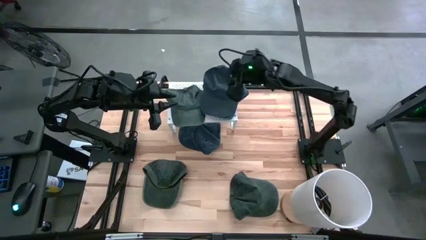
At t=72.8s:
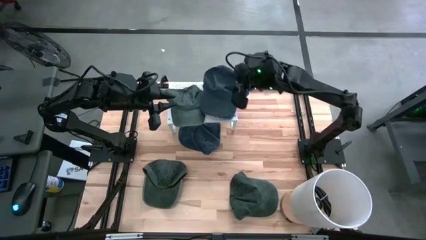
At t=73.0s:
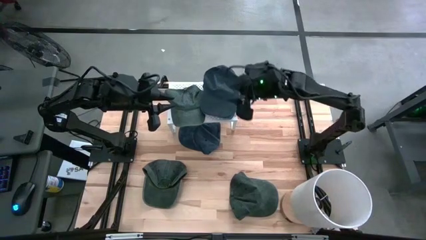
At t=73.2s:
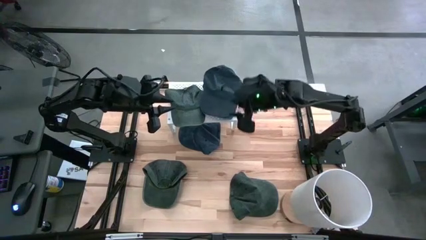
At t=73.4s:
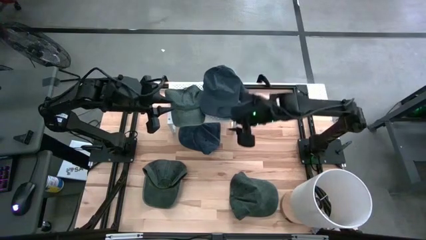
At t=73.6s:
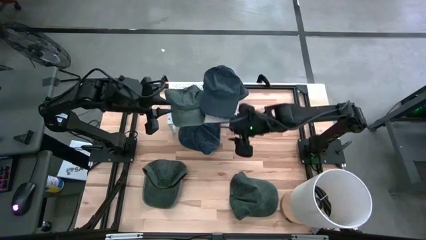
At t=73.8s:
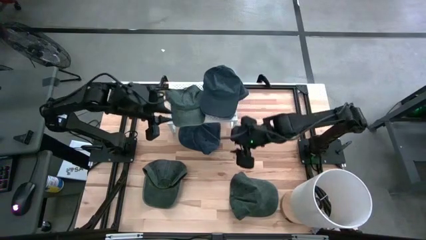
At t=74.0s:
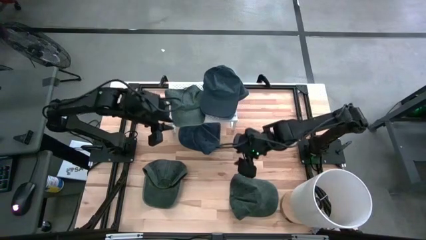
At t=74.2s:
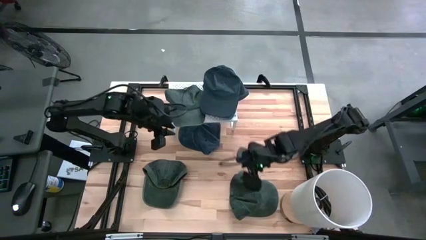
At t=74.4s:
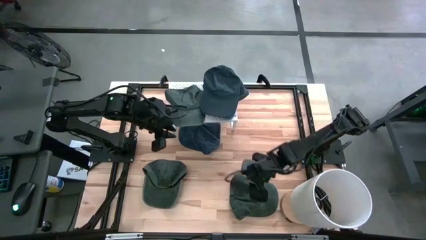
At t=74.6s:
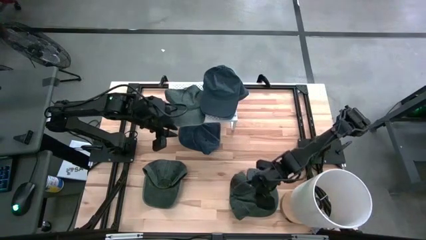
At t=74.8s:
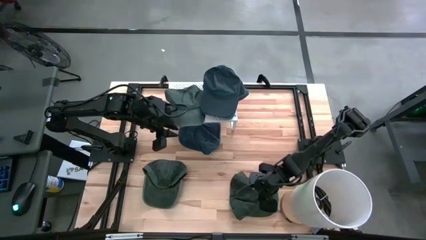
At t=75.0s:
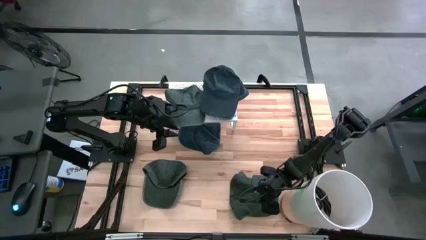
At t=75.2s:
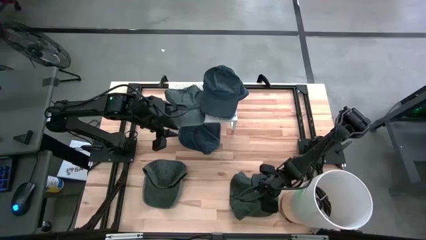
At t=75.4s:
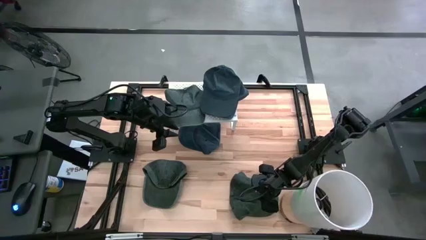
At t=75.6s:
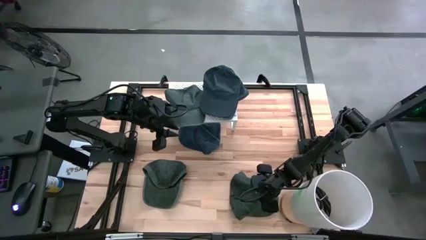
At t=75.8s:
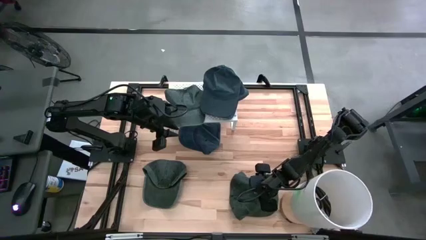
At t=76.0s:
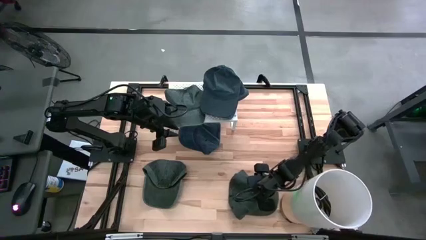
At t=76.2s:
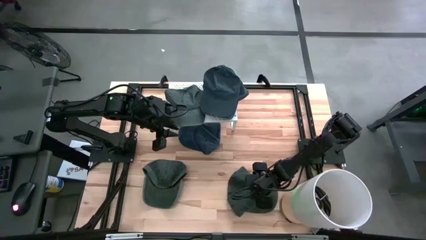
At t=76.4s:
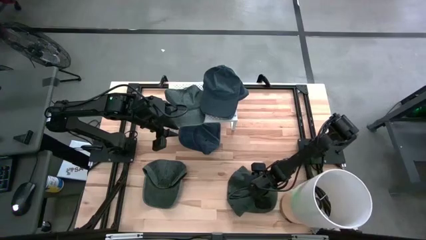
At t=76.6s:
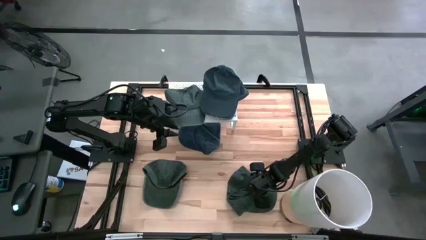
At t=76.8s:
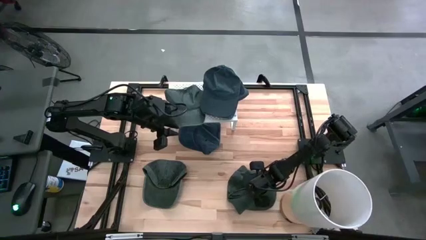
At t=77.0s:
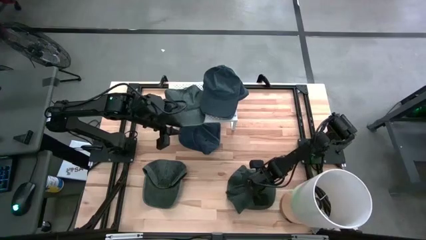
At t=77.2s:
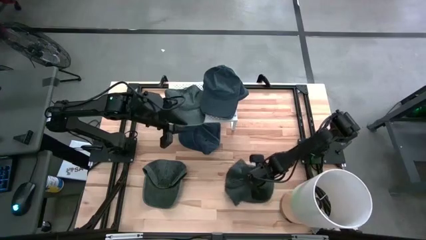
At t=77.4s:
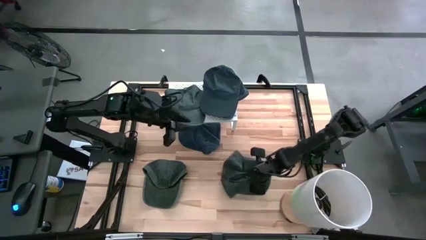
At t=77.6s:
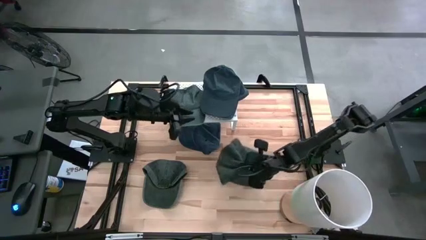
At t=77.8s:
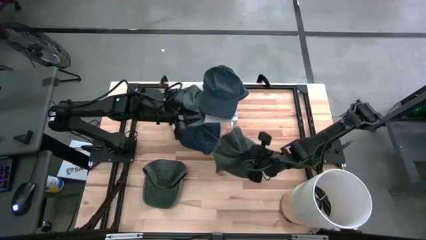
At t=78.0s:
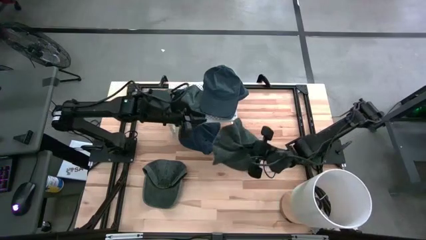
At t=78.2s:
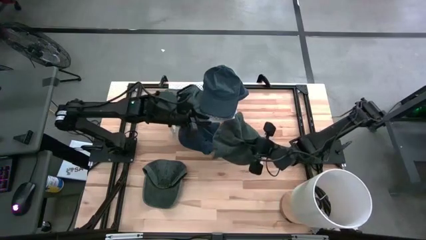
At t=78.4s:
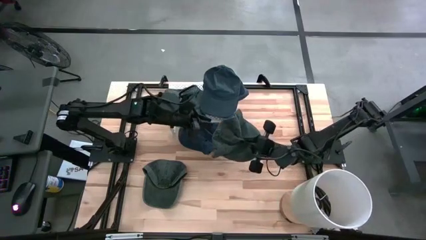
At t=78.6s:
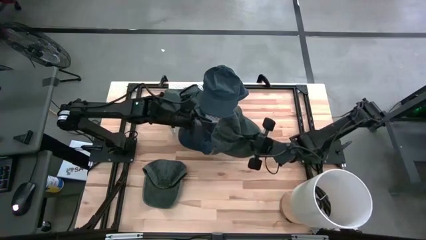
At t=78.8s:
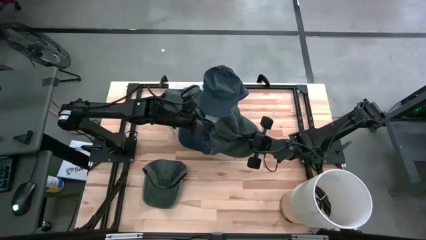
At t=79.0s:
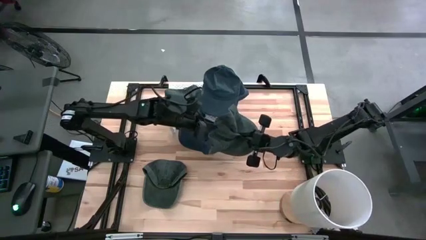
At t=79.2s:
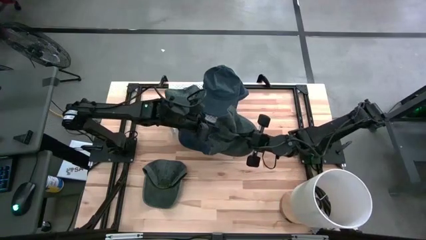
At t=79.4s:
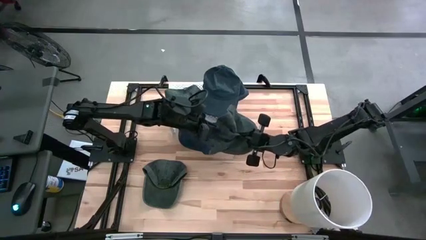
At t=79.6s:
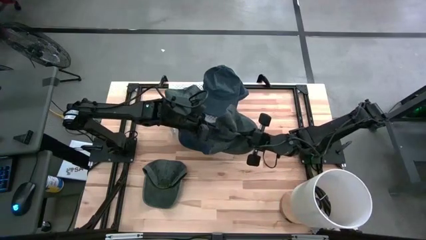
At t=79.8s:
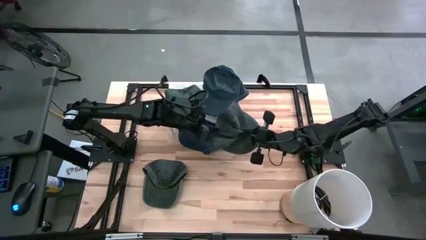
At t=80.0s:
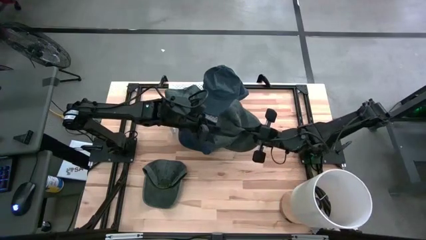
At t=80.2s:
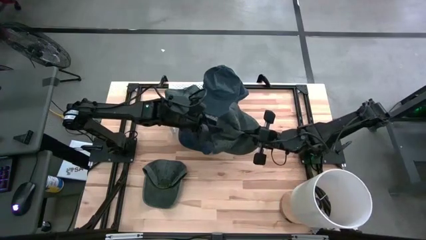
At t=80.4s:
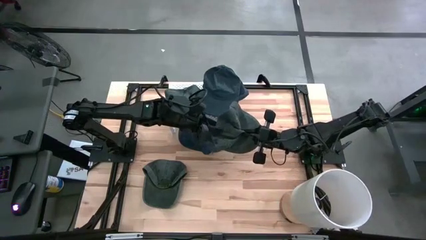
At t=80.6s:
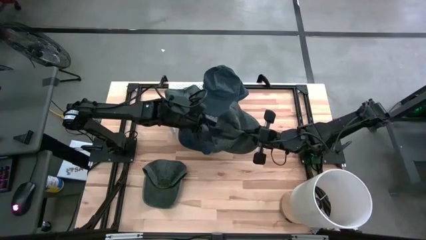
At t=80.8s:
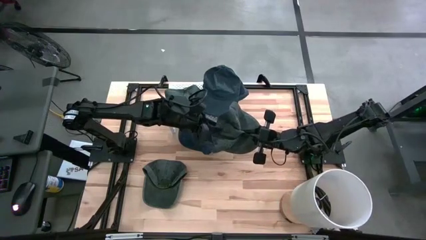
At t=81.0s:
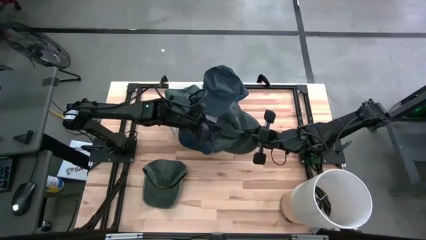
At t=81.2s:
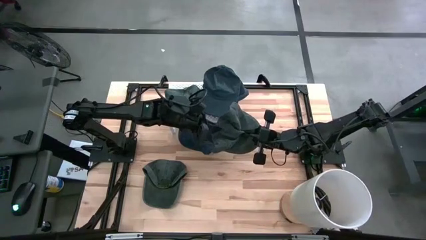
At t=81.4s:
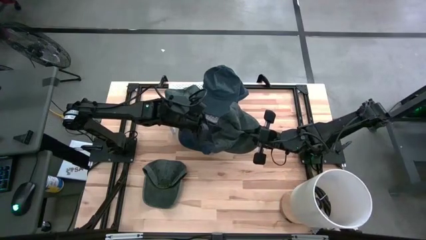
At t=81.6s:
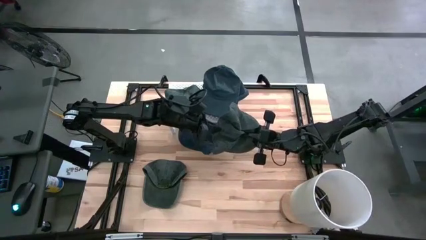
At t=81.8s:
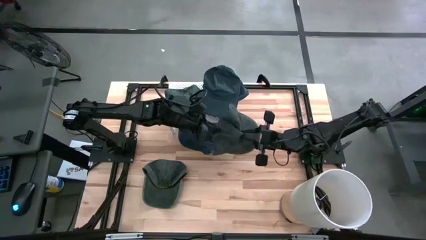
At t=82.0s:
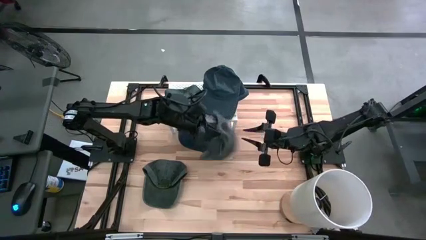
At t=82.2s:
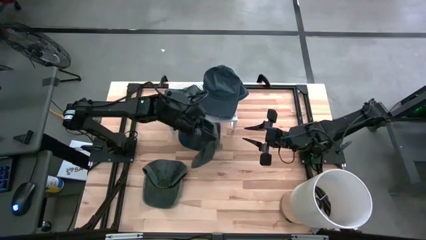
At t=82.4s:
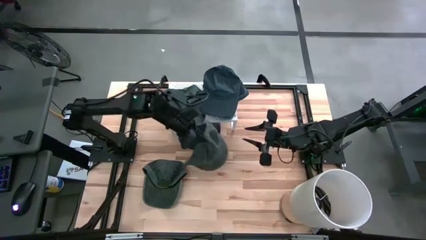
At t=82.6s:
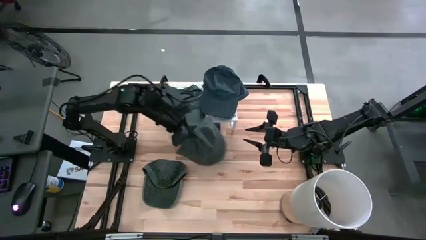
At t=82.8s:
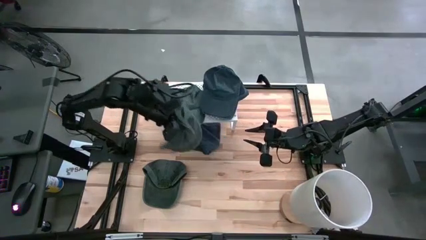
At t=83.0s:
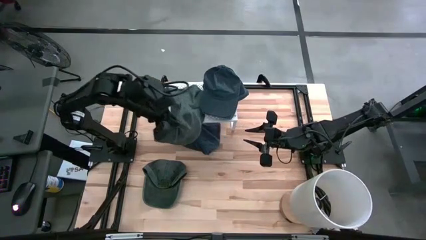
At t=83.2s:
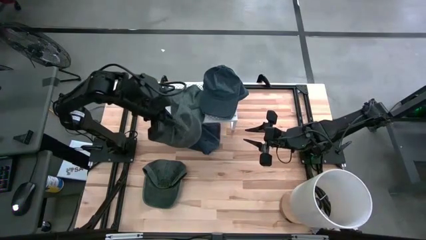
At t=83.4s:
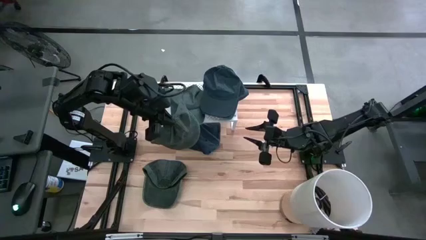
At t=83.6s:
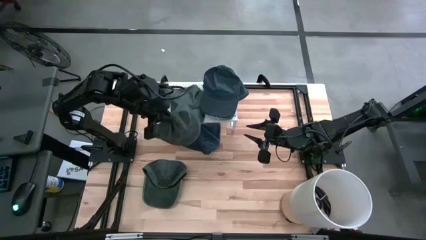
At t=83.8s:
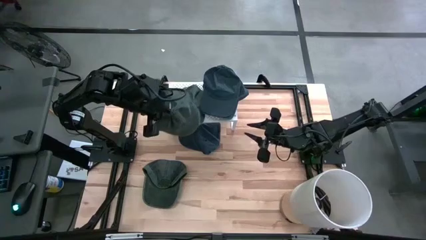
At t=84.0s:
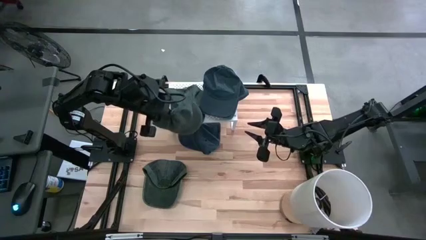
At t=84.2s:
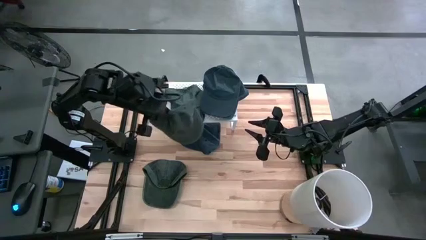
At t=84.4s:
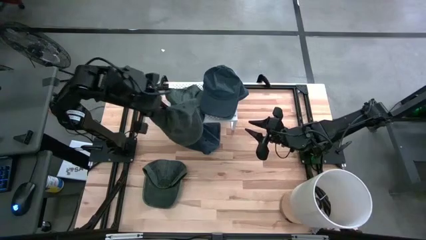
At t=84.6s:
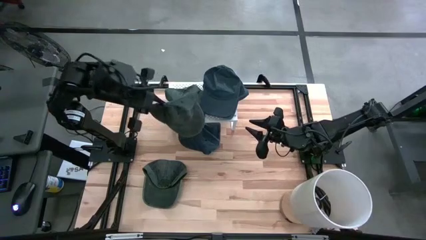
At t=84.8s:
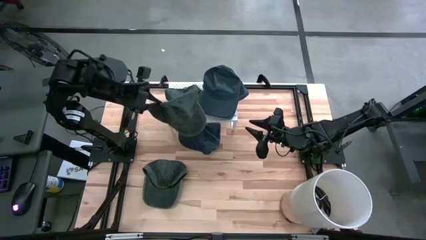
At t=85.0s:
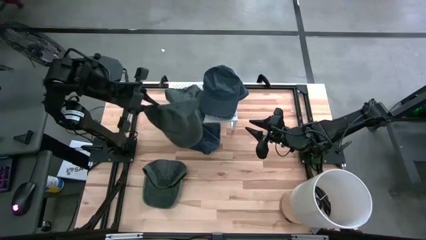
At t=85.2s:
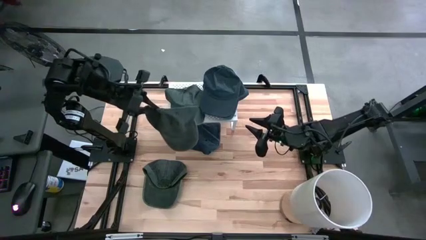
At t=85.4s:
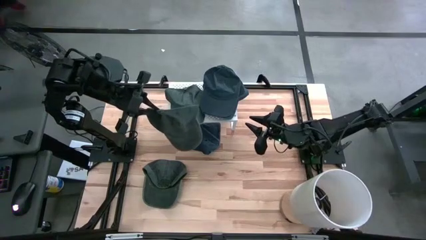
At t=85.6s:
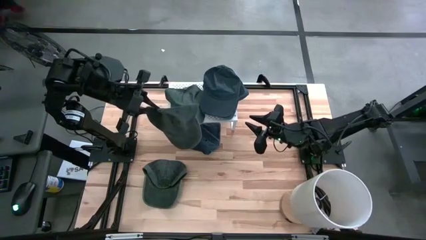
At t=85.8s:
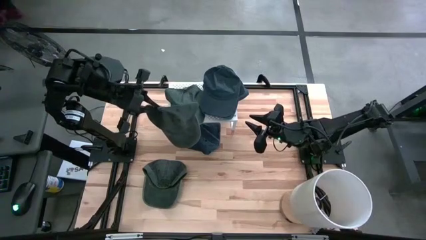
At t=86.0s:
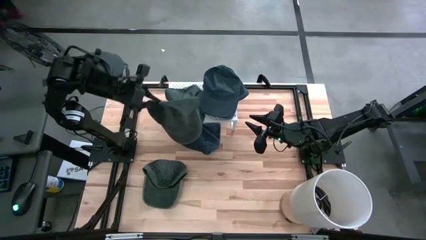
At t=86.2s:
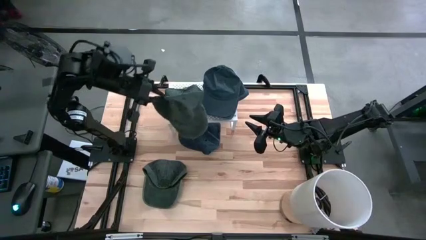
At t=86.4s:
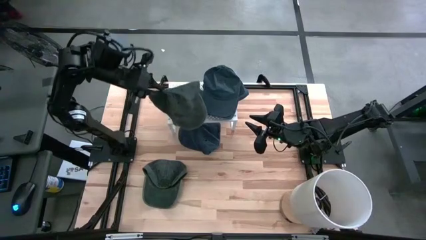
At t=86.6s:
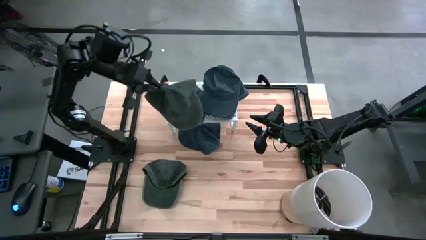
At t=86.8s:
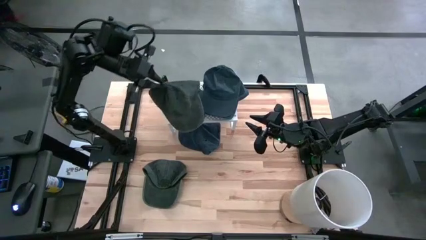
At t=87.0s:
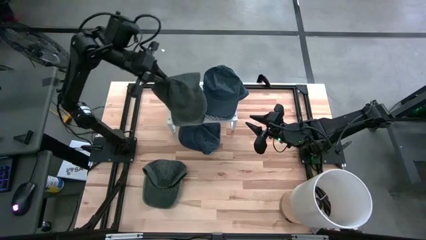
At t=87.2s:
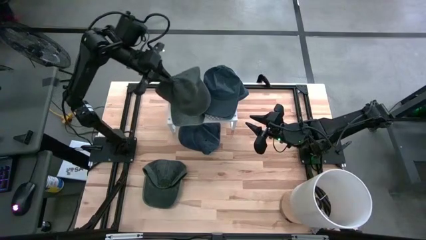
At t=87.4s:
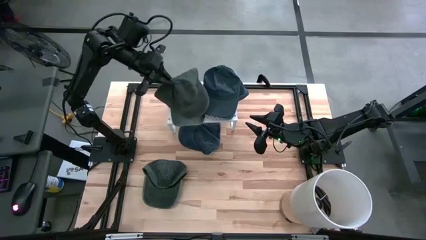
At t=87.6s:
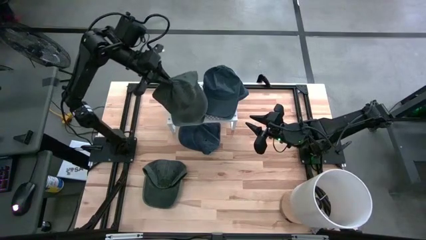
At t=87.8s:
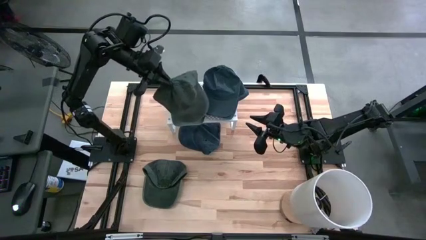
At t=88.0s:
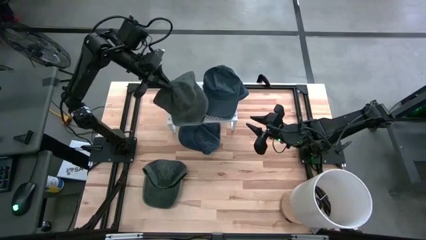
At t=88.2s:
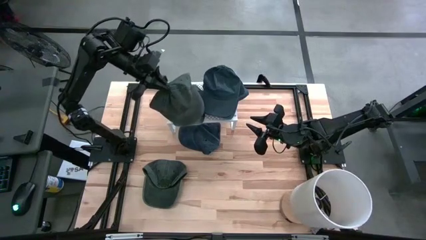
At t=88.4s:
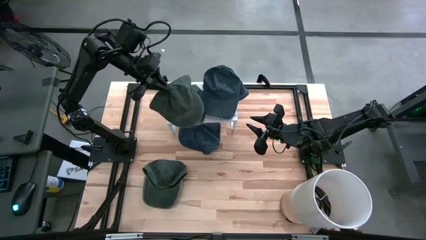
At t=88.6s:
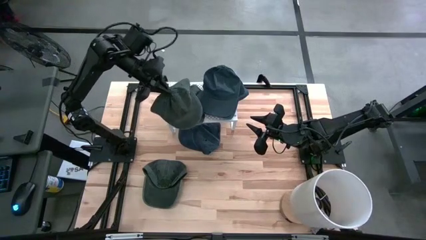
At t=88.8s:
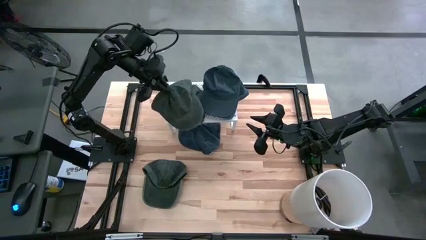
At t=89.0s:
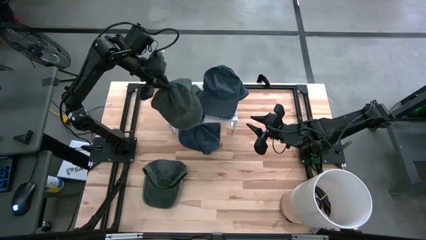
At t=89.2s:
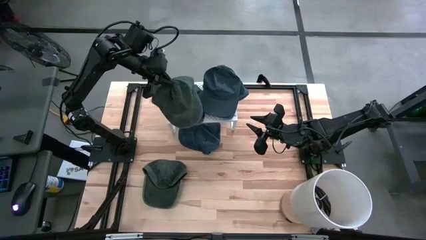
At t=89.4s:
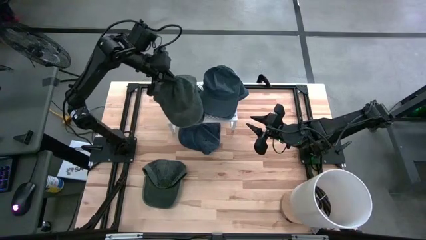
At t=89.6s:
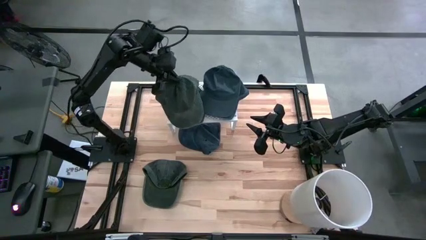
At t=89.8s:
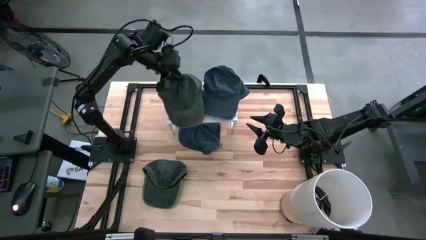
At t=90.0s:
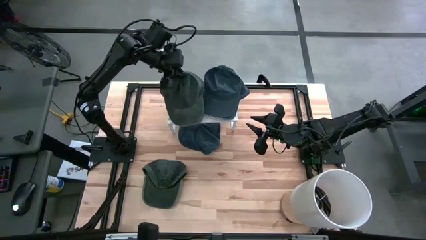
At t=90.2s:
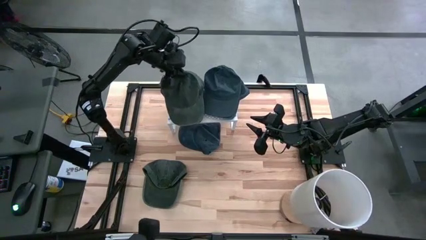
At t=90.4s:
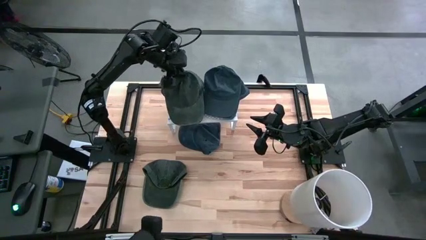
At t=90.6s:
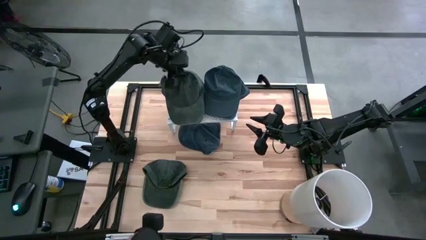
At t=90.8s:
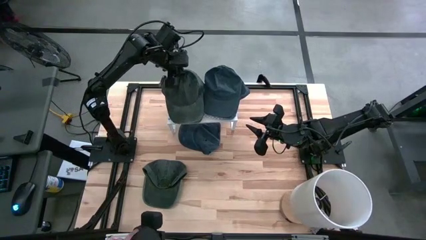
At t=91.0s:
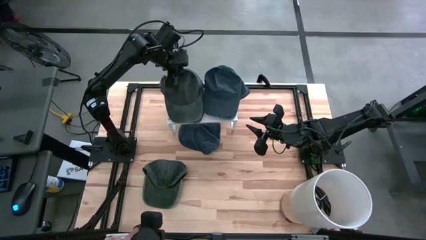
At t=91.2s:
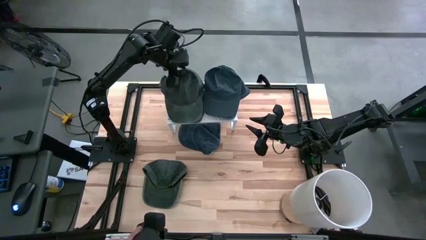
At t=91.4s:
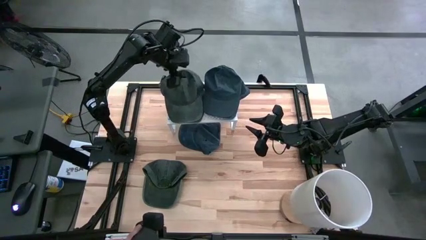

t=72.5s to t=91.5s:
Task: Pick & Place hat
Stack the right gray cap on the gray cap on the shelf
